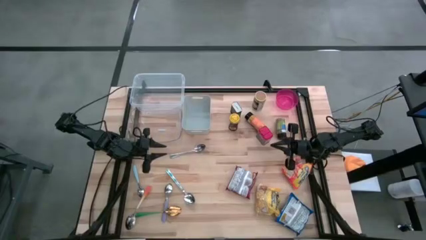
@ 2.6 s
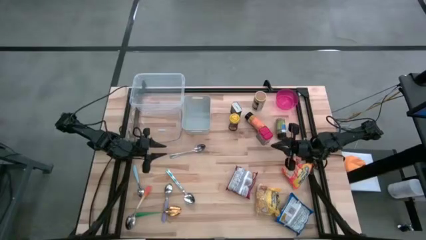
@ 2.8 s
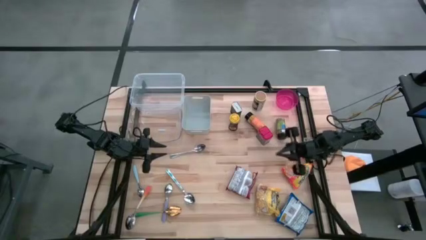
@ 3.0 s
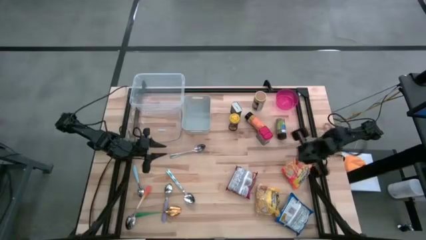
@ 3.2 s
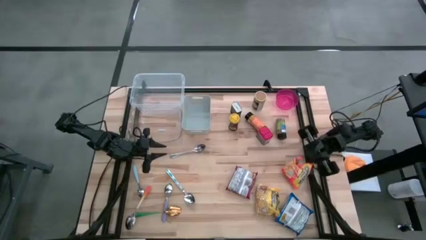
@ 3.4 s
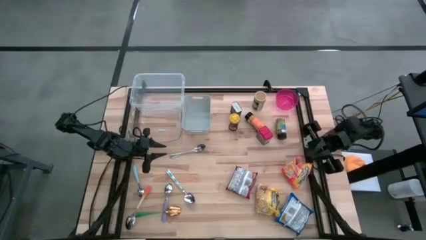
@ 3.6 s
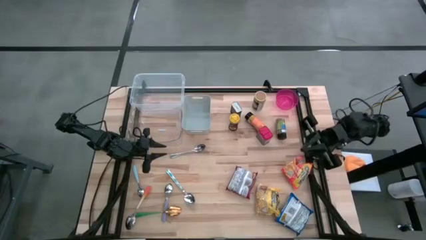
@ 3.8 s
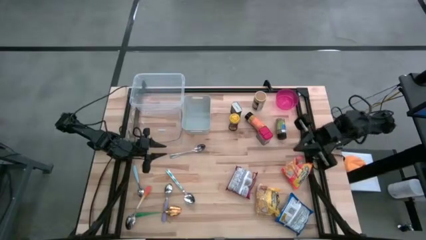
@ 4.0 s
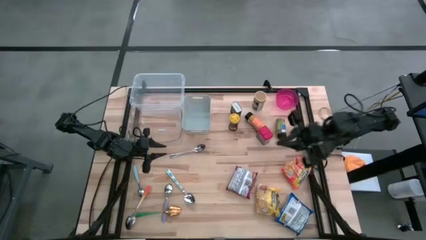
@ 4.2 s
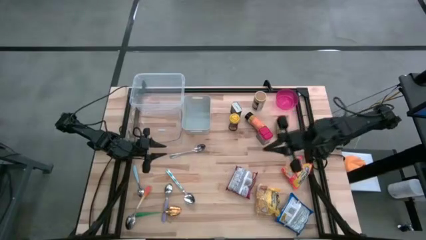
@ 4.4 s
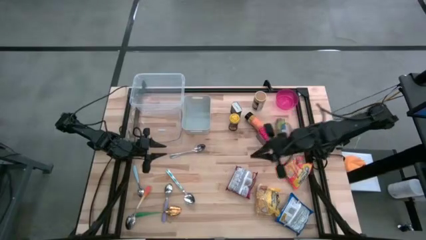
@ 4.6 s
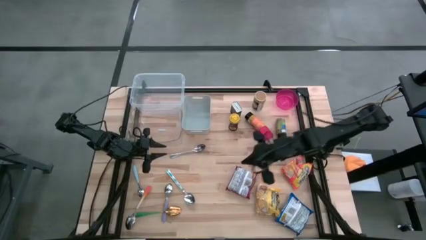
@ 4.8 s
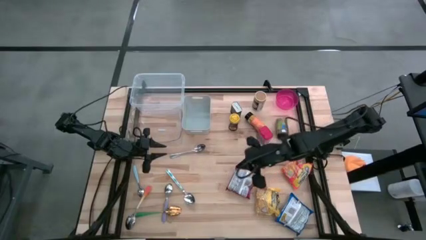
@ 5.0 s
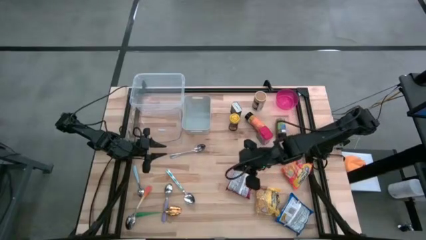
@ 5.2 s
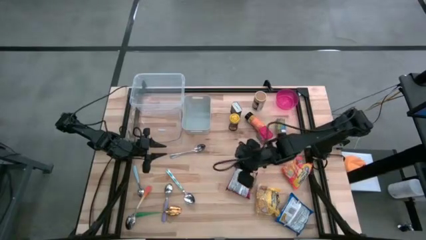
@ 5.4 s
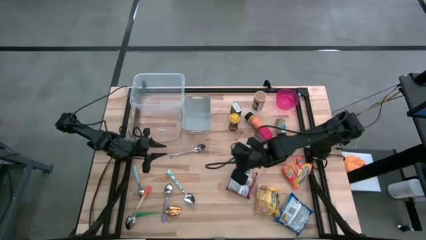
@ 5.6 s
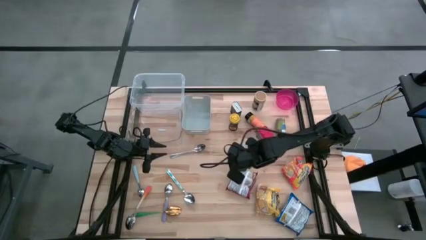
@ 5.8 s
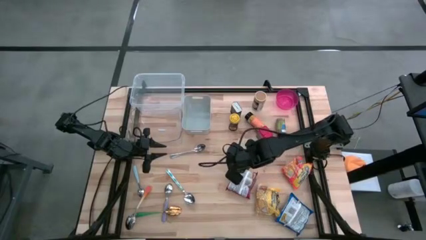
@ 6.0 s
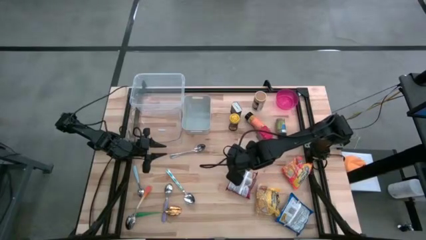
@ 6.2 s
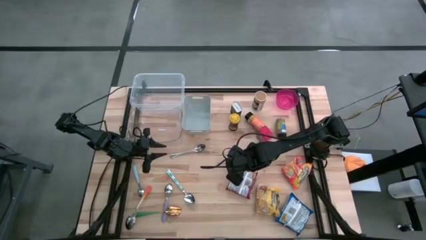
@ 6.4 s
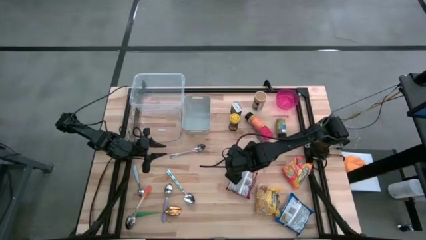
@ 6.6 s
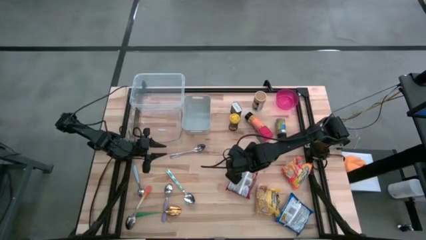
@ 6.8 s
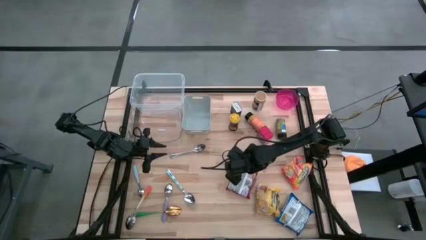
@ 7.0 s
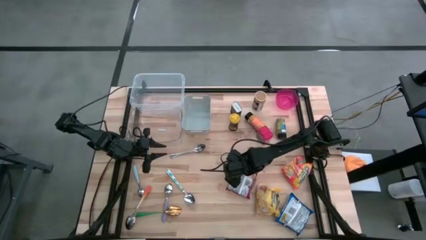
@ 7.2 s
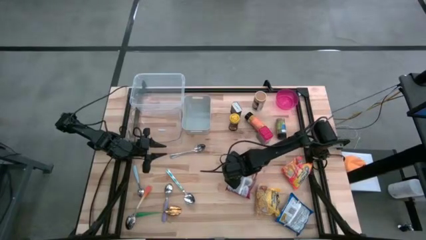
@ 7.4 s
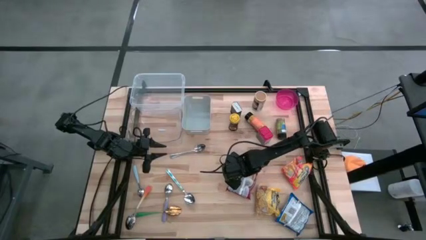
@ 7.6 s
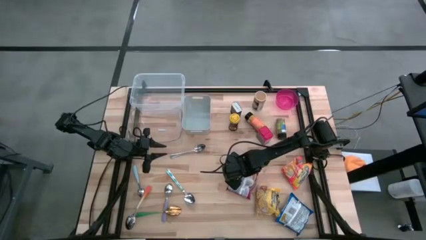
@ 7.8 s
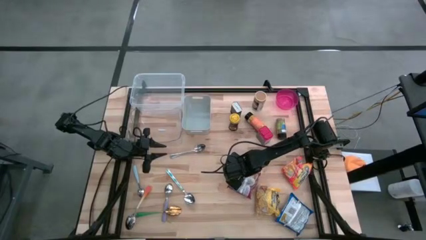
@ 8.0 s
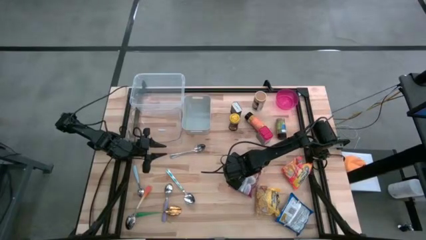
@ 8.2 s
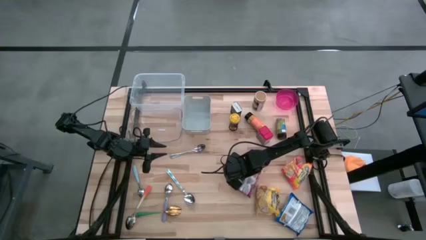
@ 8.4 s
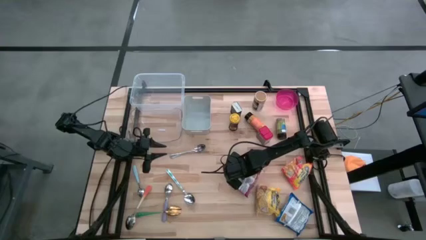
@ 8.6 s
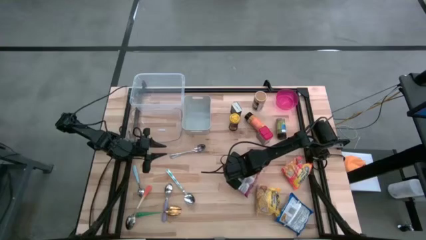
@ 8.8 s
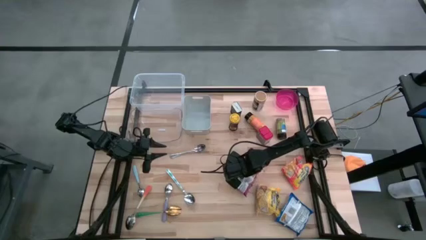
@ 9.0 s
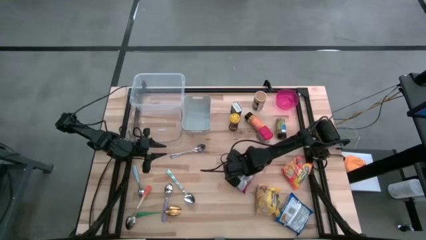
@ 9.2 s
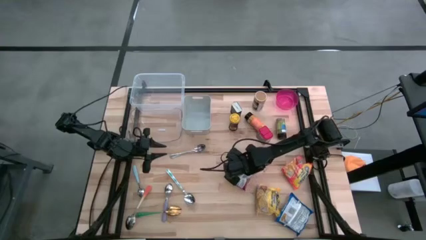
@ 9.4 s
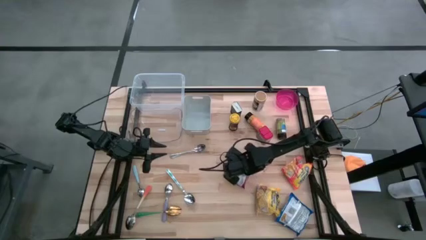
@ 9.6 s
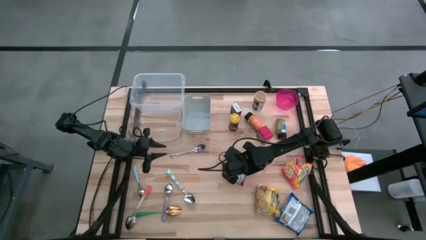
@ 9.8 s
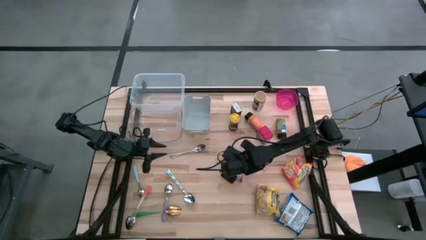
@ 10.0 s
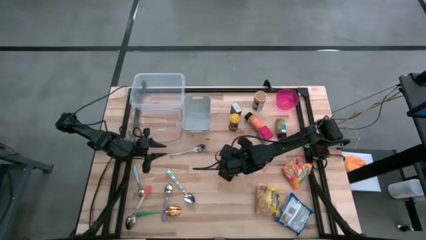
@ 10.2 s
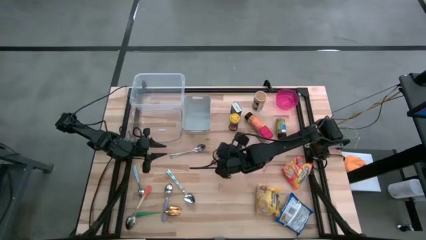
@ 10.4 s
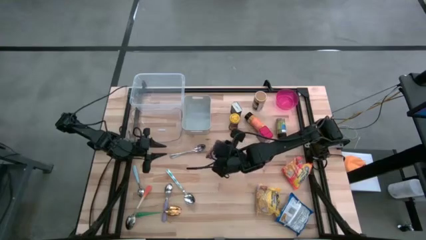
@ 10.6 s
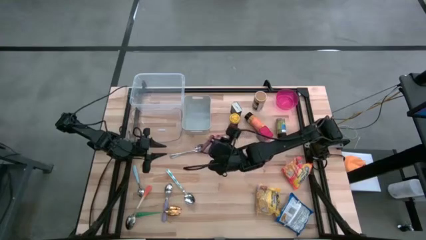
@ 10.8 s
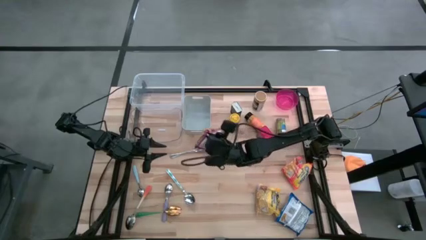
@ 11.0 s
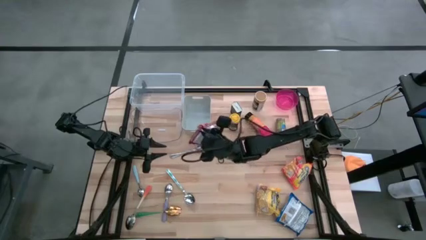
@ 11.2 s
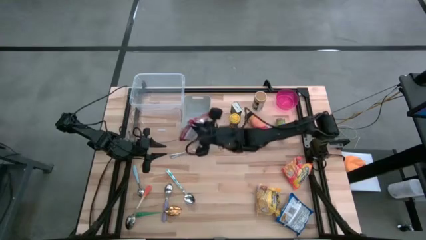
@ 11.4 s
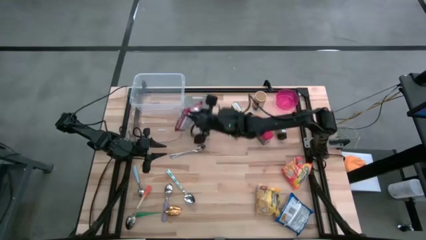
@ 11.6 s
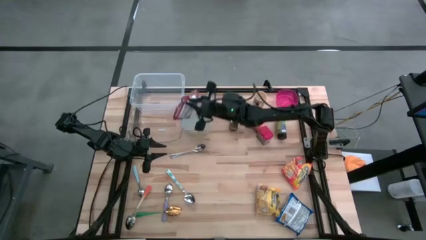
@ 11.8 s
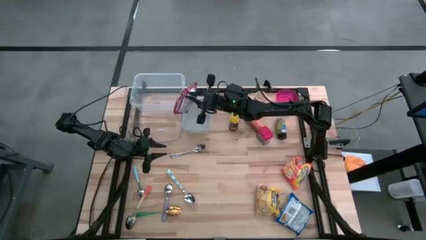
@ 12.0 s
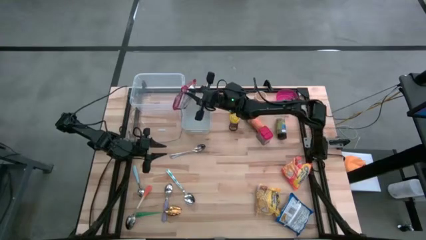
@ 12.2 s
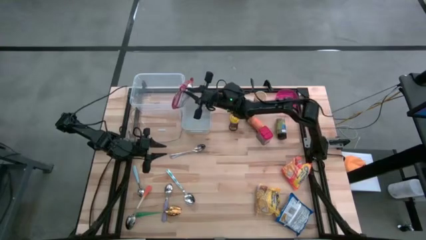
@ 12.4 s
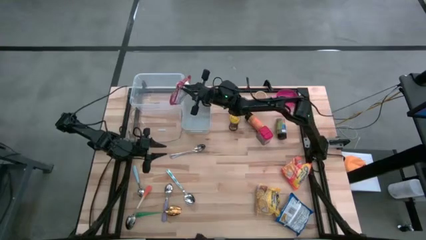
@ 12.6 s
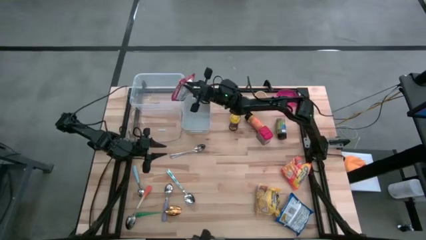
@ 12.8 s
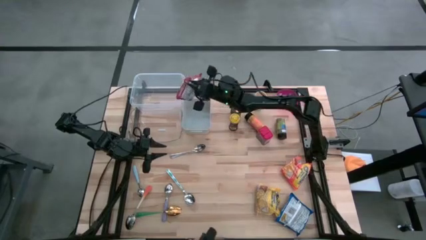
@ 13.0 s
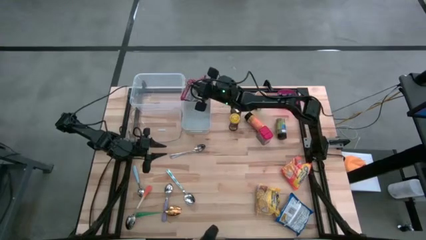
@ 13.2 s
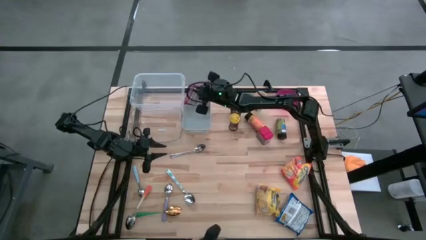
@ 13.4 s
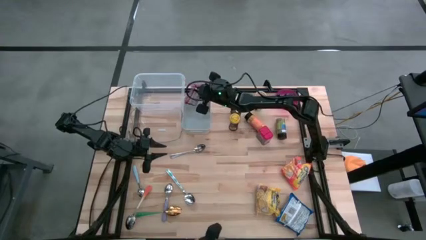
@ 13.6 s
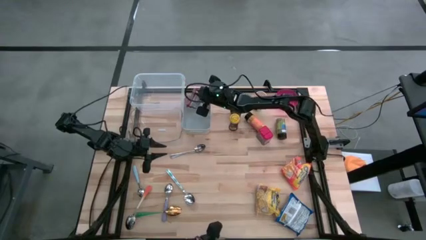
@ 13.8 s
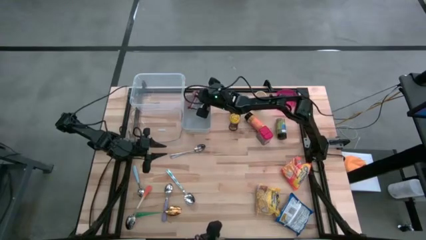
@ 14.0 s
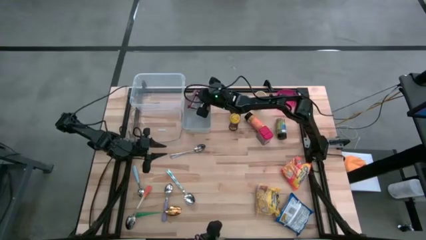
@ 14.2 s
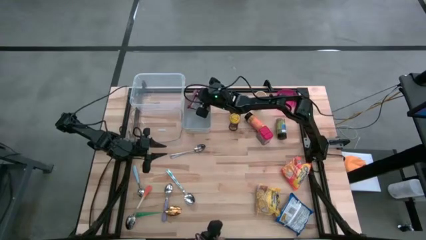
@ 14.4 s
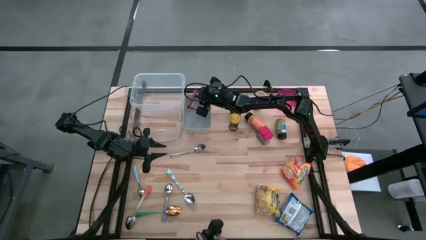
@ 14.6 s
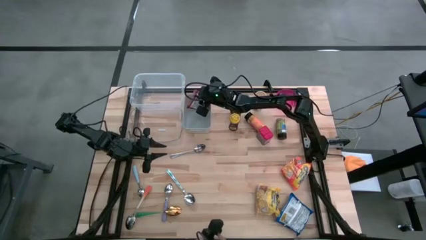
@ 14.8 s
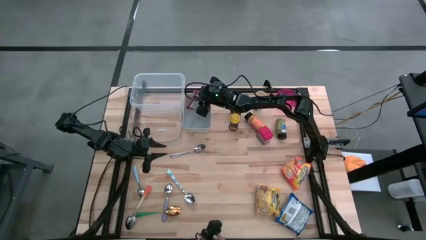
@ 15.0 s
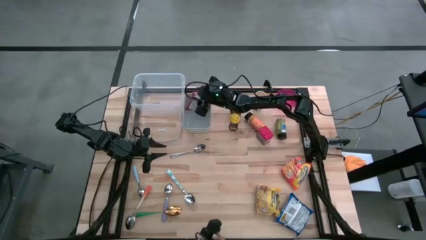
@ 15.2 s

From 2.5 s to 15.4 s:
Put the red noodle pack into the gray bin
